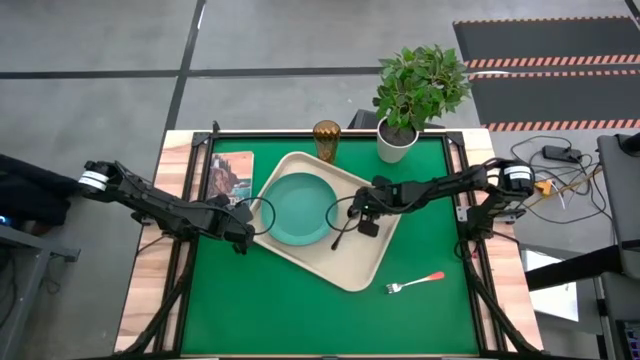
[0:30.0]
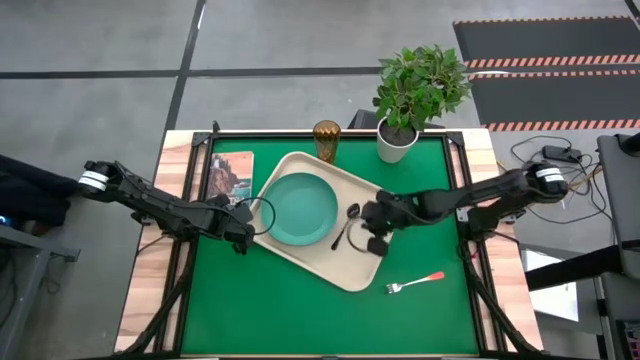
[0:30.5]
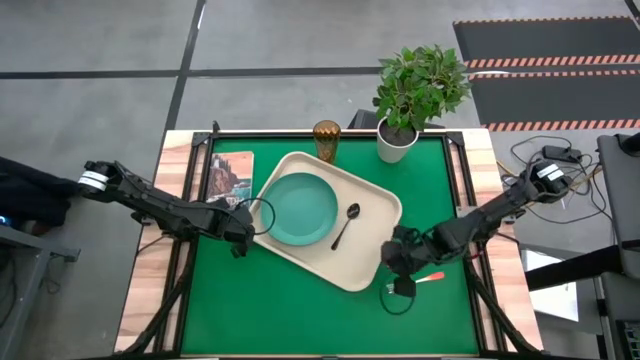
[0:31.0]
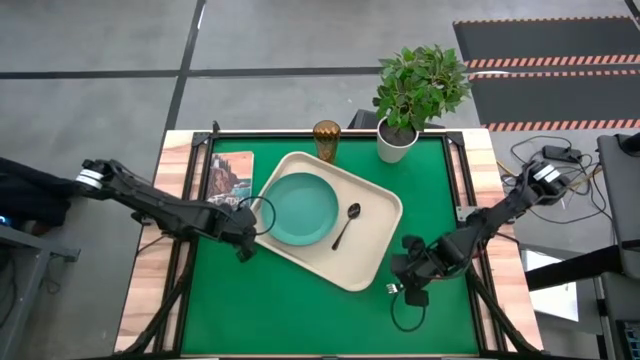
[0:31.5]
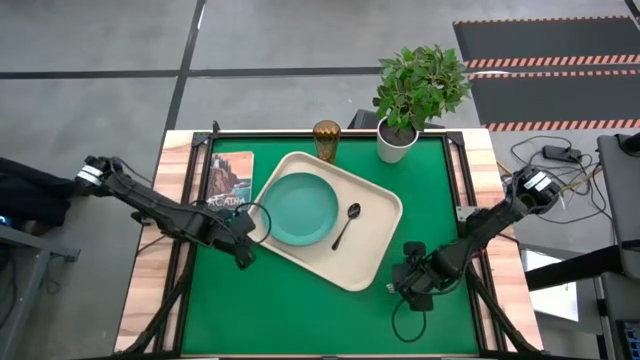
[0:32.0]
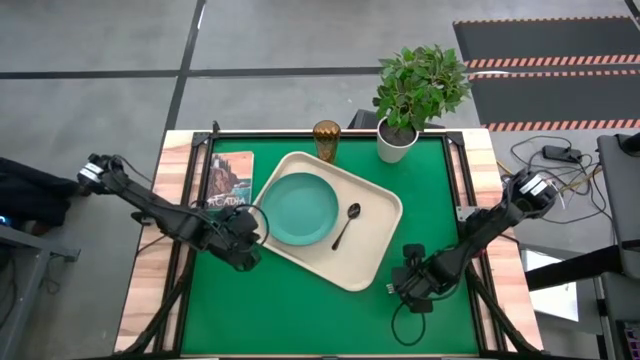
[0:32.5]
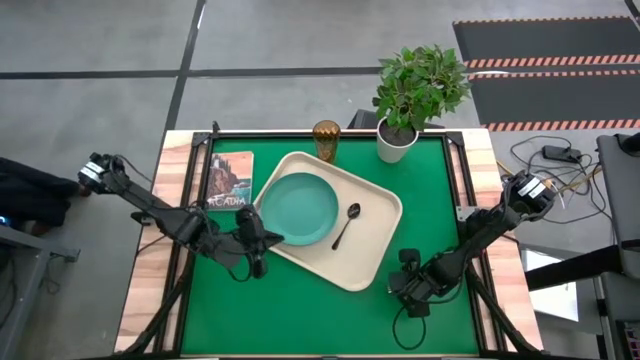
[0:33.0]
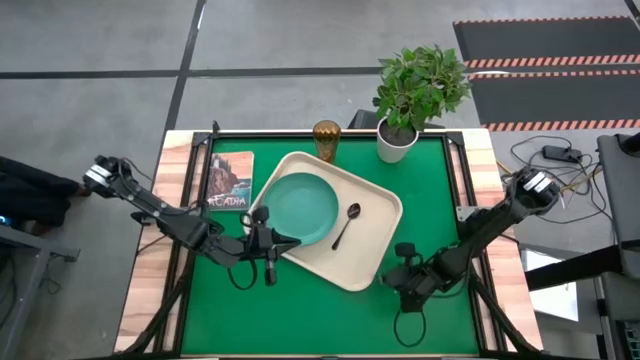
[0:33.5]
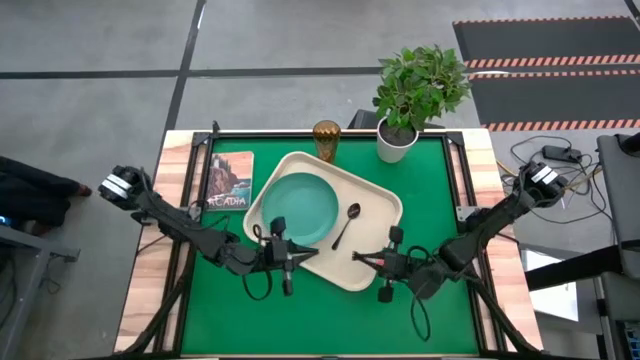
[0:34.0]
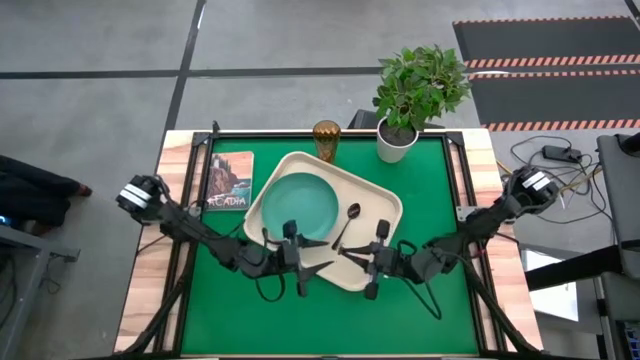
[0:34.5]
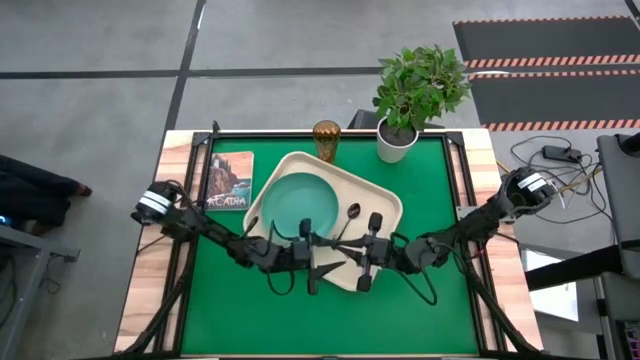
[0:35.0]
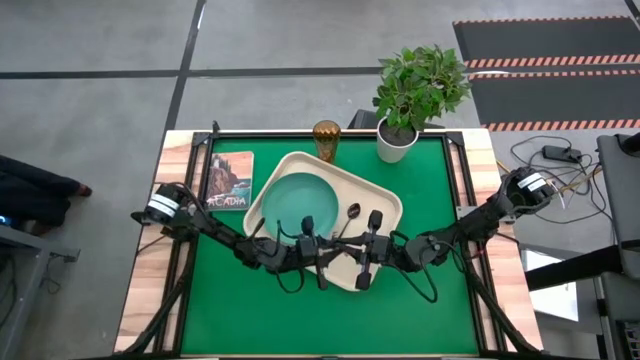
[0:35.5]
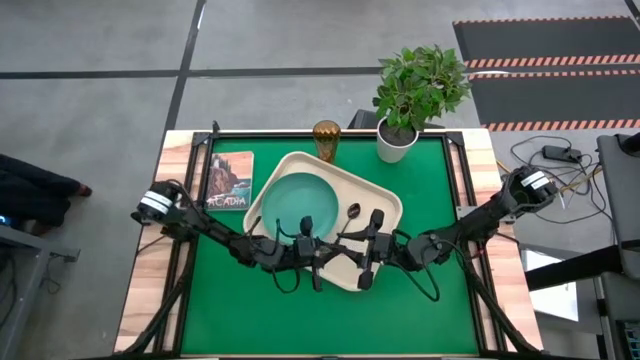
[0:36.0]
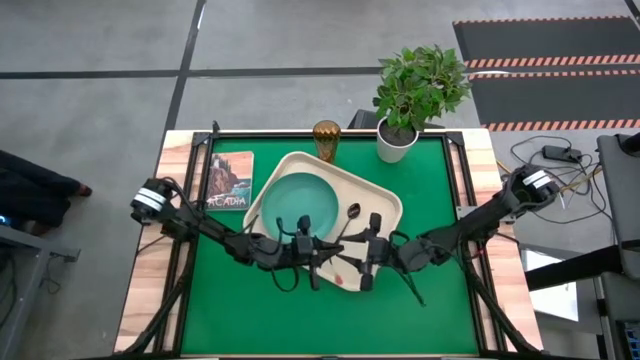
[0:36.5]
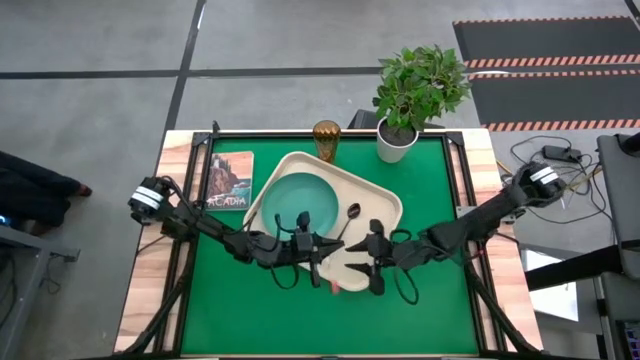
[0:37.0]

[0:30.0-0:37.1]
Task: Pick and place plate/cup/fork/spoon on tray
Put the white orange fork on the right side of the black spoon

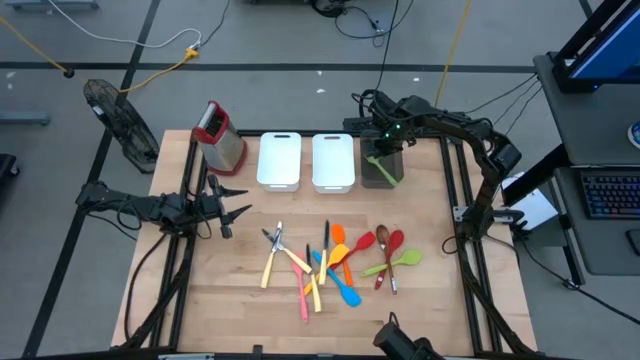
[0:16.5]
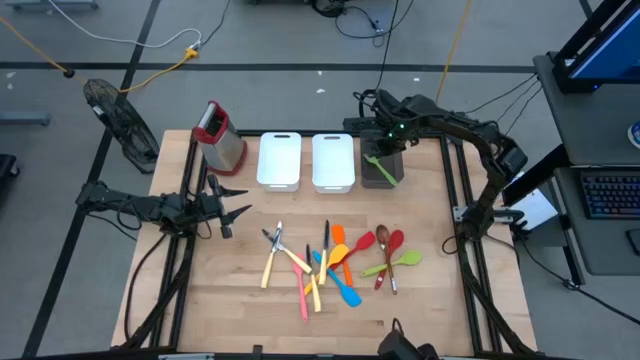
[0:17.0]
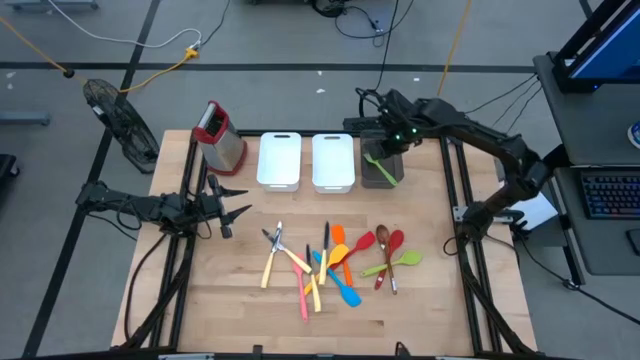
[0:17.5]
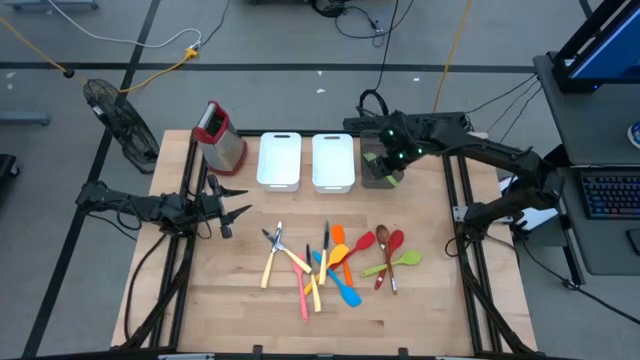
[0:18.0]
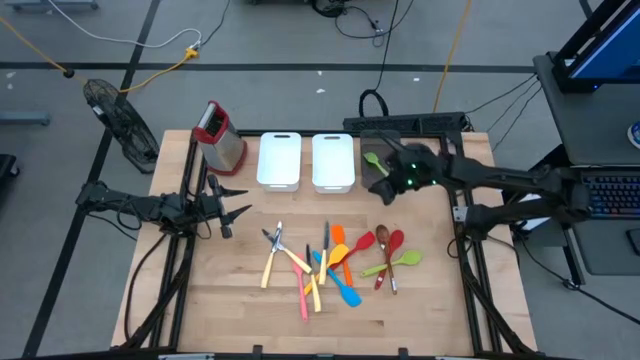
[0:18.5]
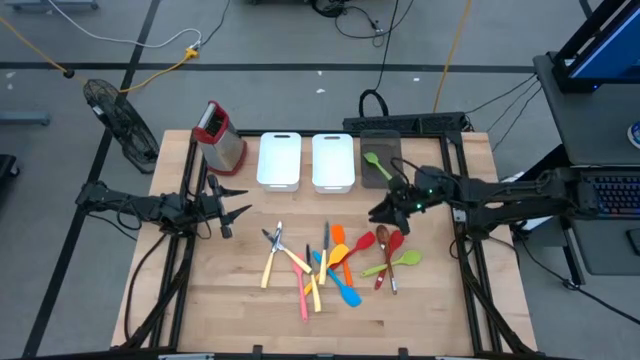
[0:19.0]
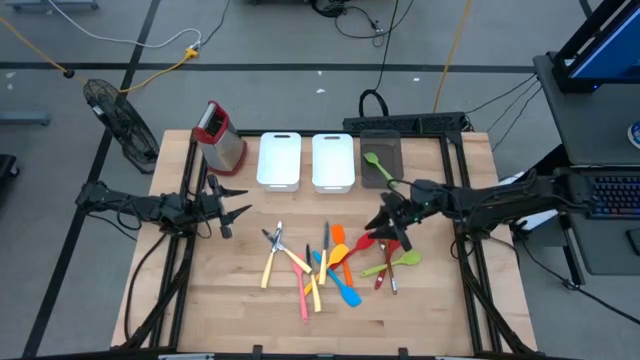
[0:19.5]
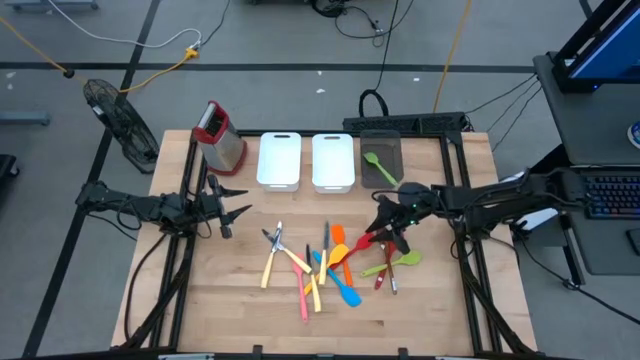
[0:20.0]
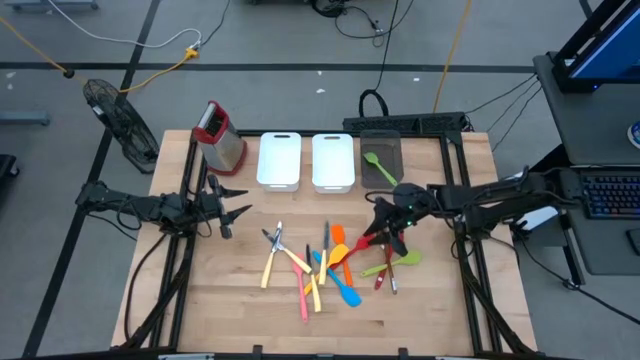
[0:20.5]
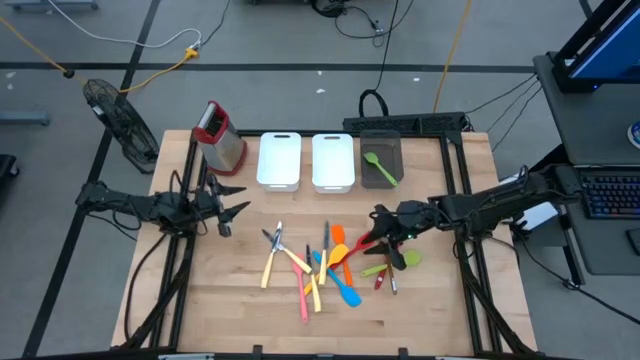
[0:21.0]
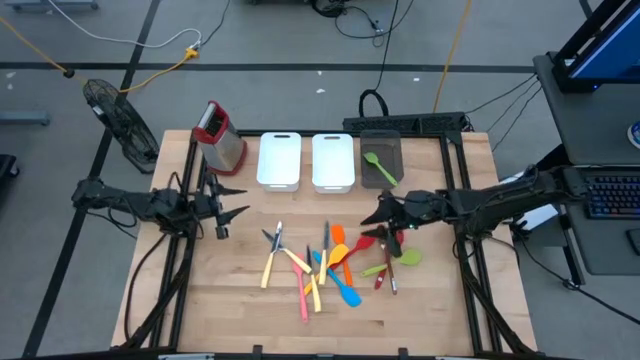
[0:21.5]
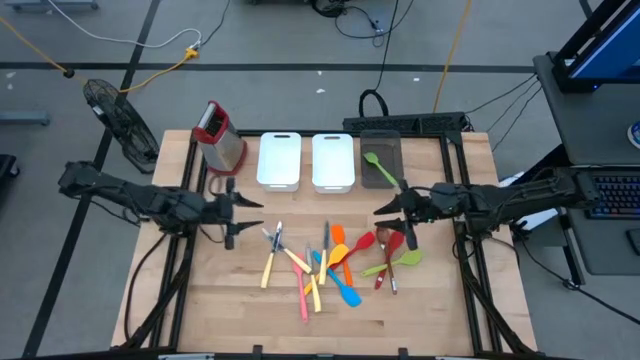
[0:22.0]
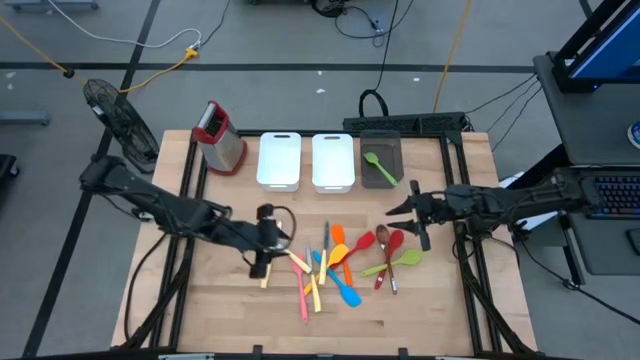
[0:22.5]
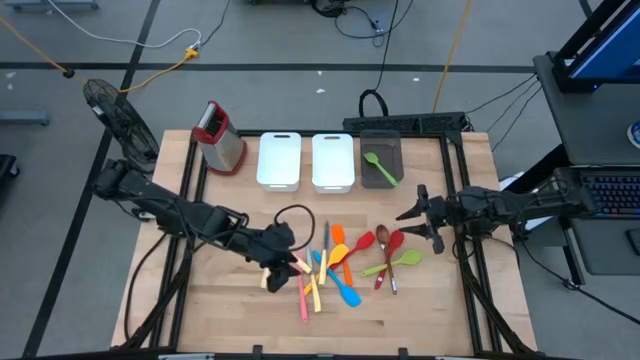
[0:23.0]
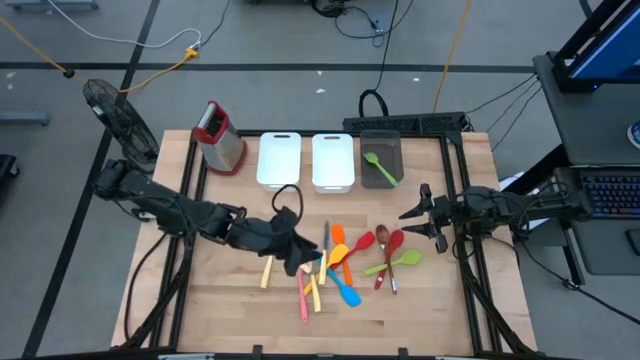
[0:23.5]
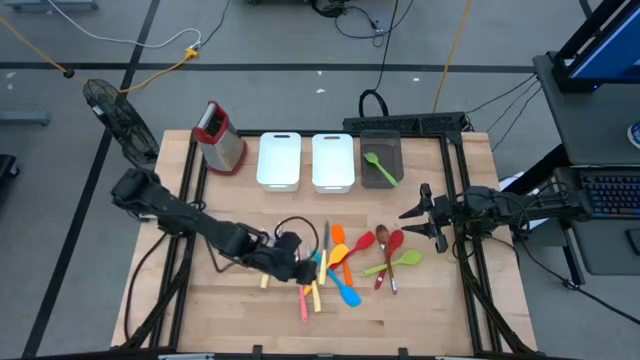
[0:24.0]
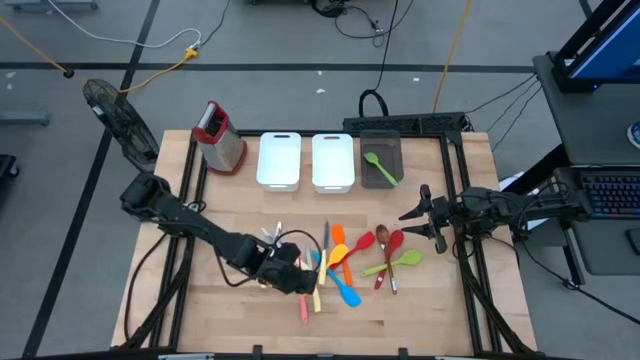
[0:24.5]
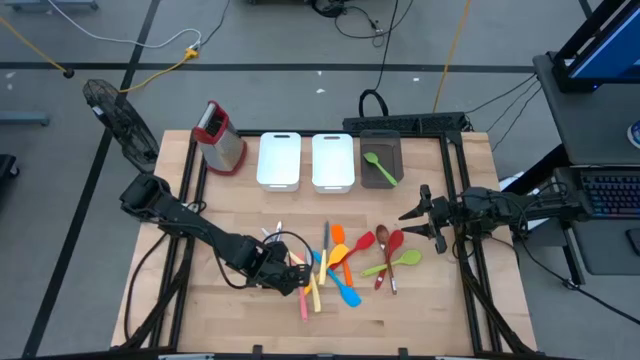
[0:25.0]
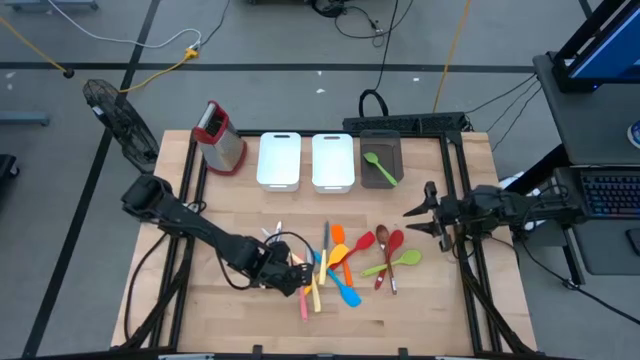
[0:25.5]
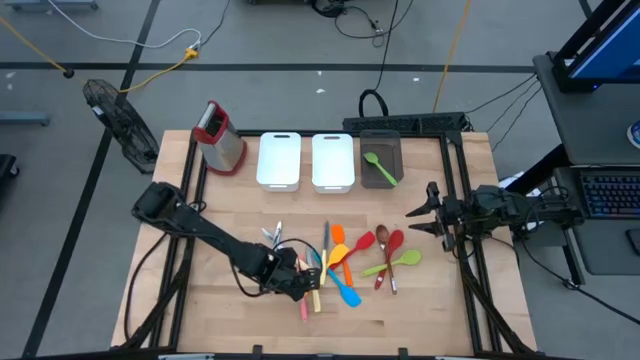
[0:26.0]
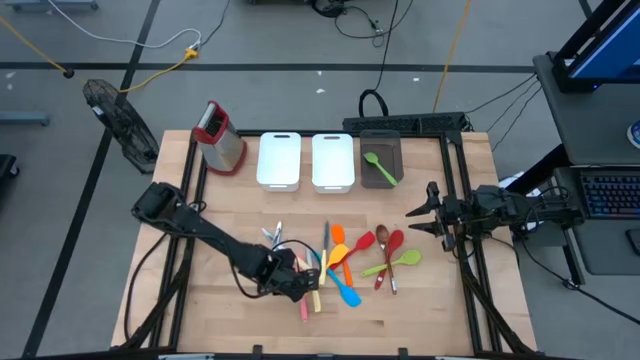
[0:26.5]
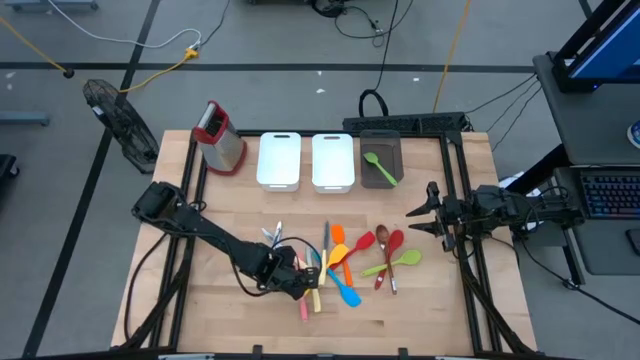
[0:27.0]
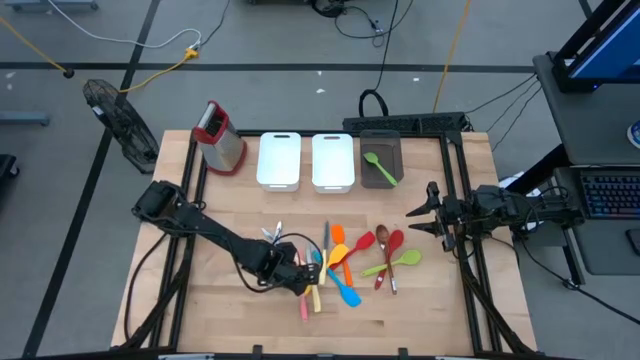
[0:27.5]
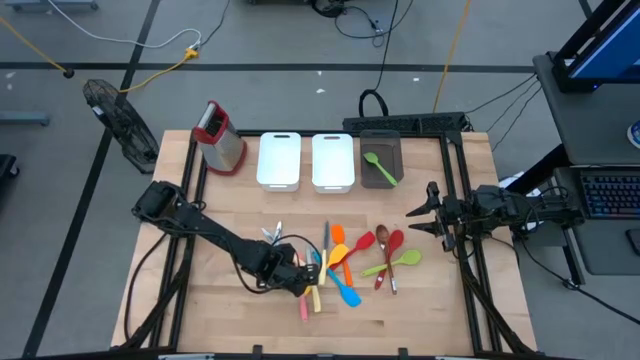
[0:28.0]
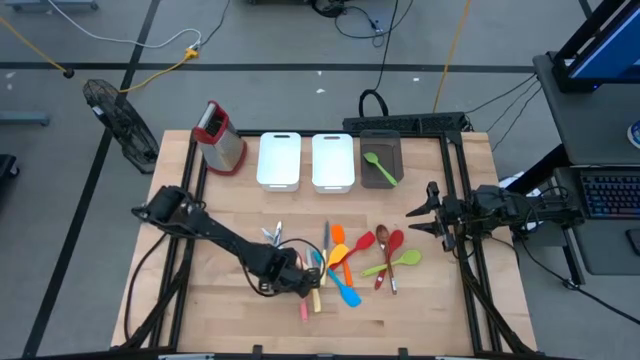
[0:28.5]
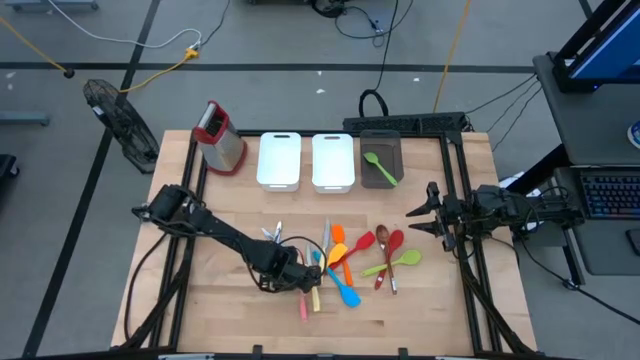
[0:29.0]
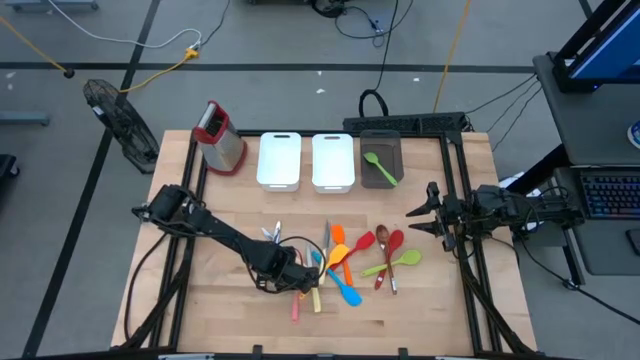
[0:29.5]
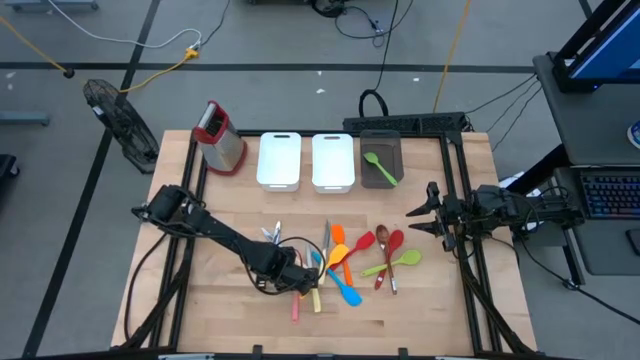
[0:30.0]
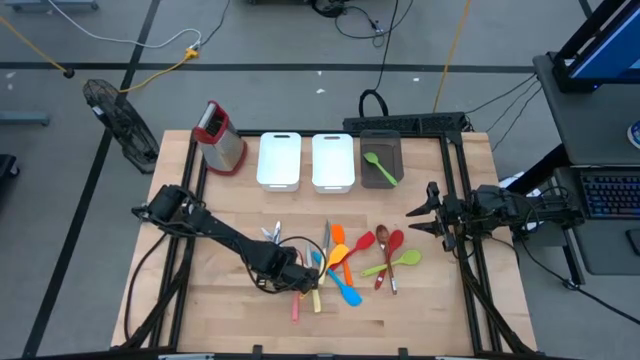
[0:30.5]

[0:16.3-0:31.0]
Task: Pick & Place Kitchen Items
Put the pink spatula into the black bin
